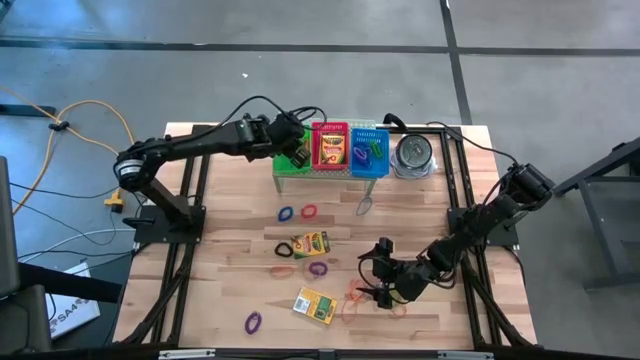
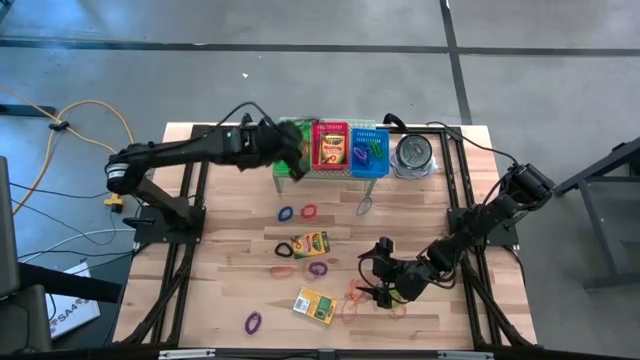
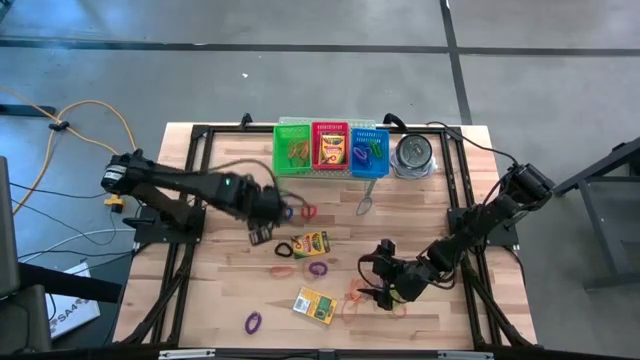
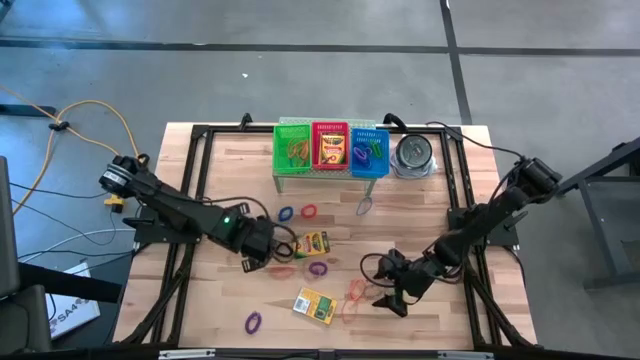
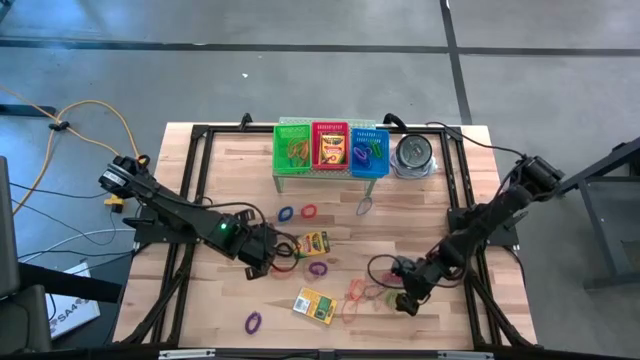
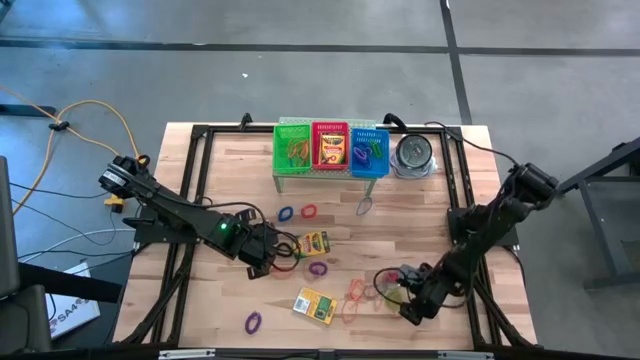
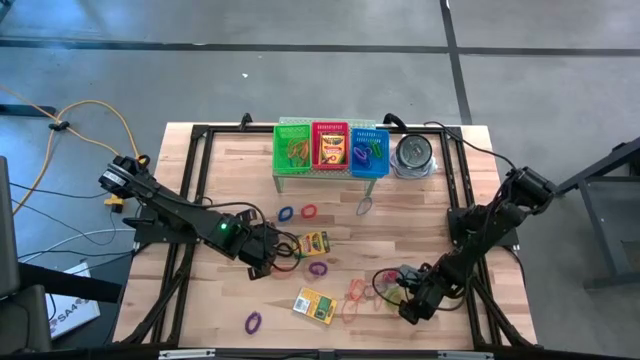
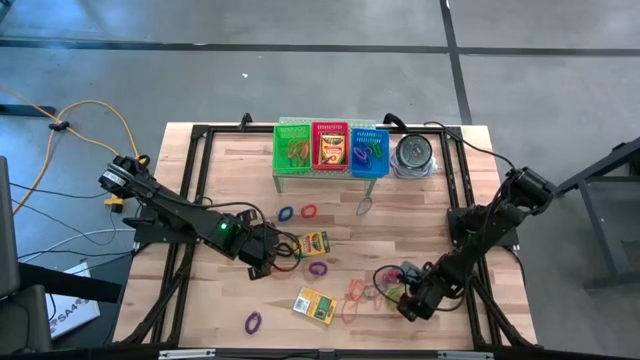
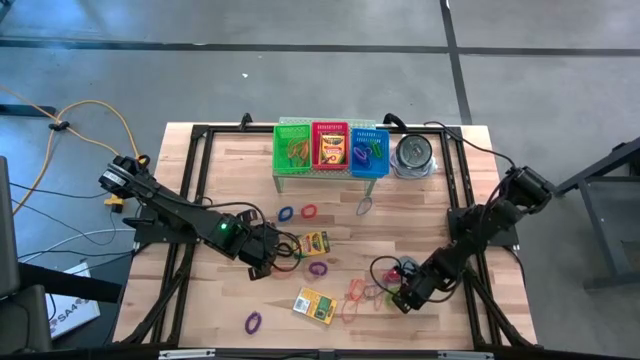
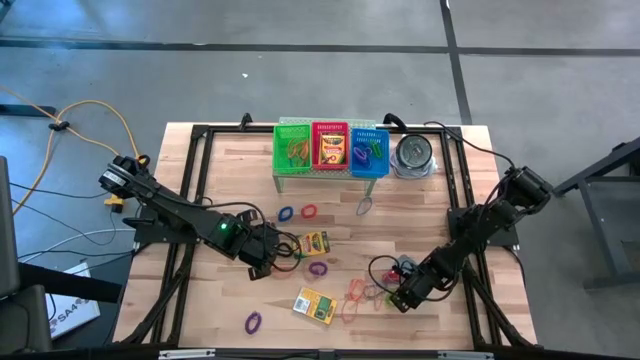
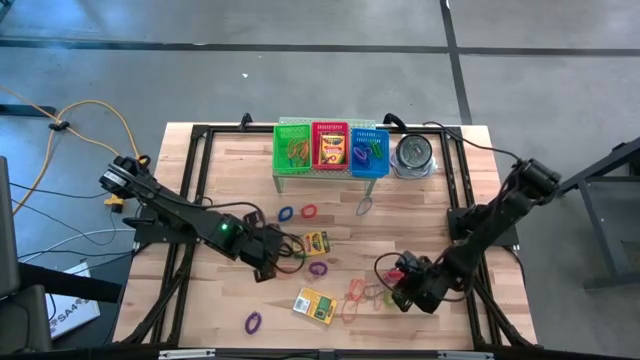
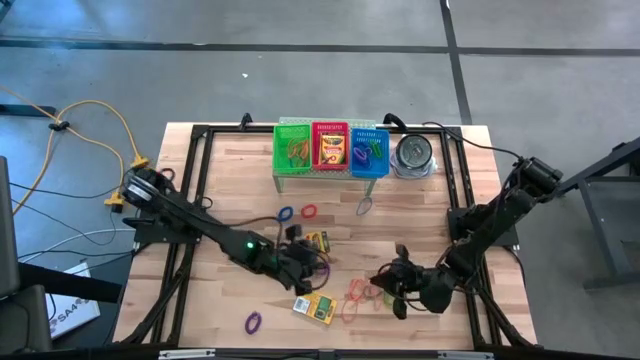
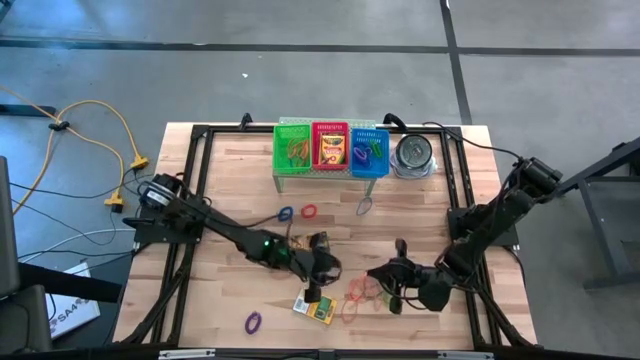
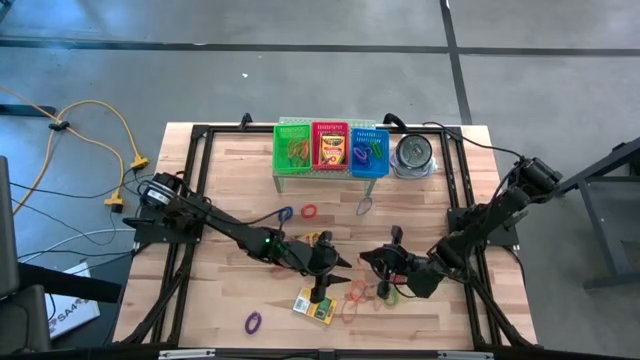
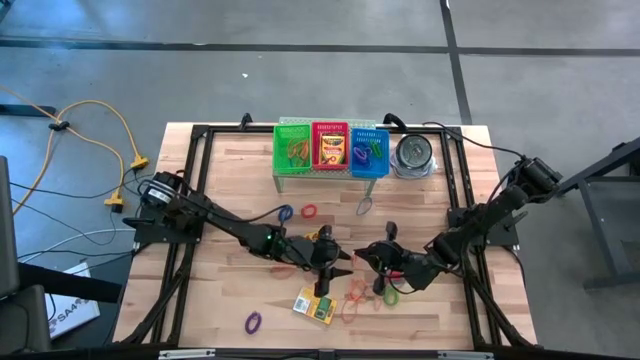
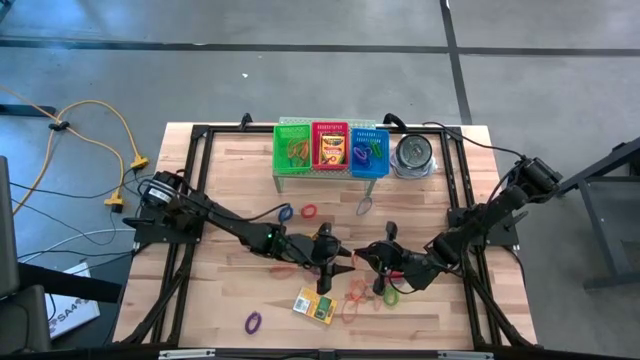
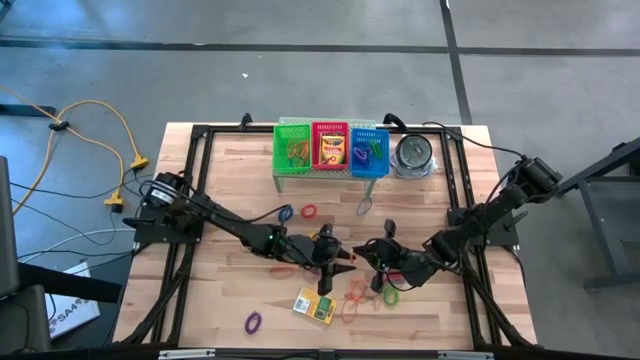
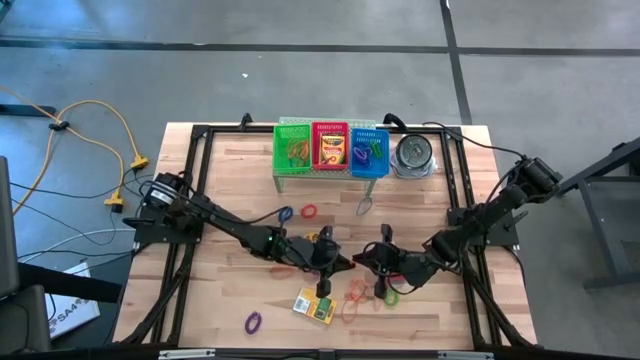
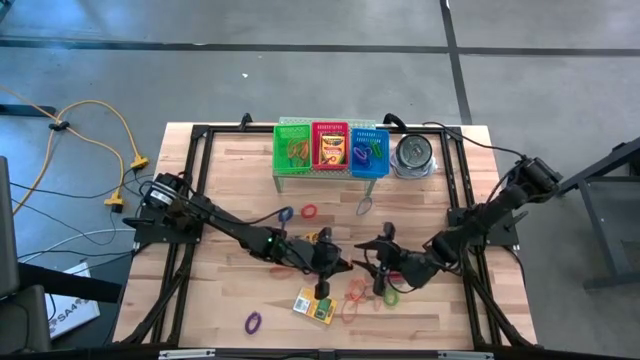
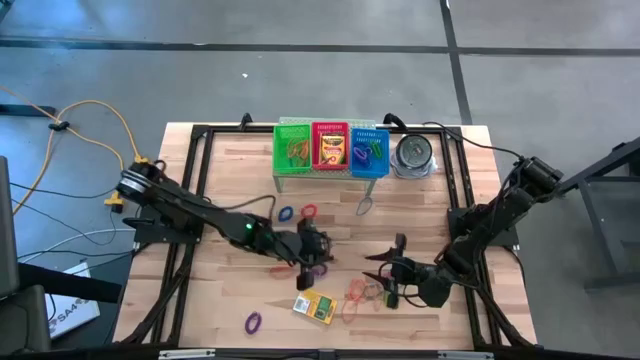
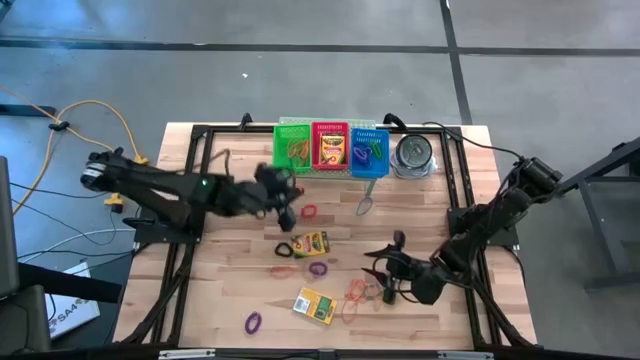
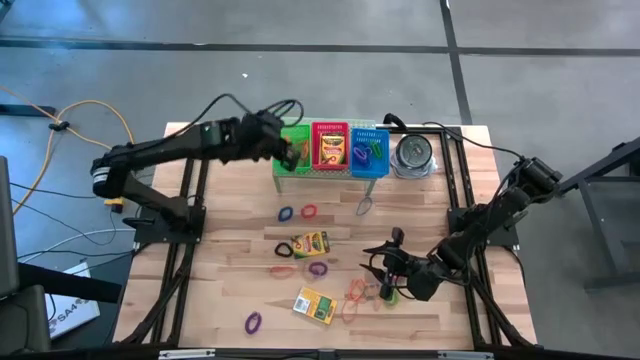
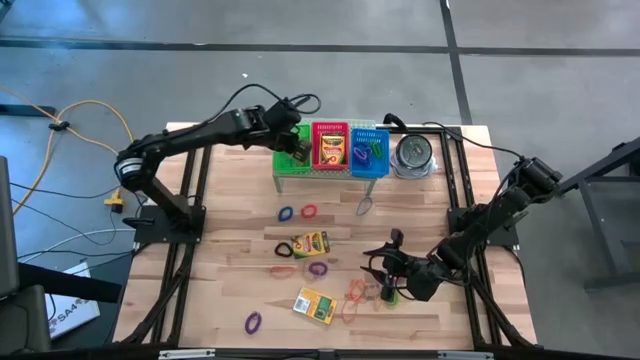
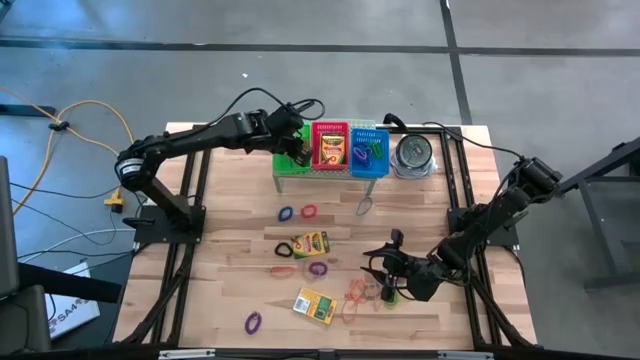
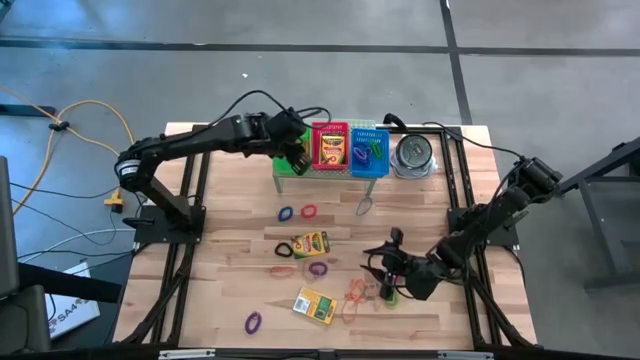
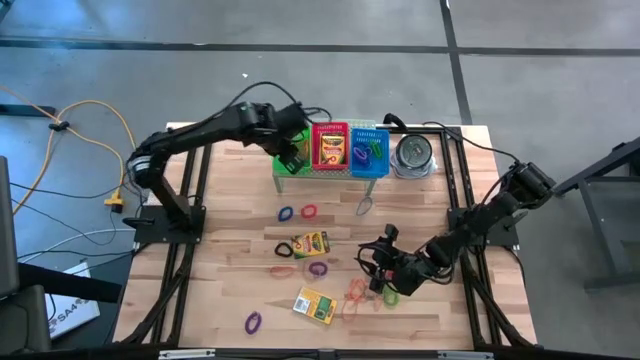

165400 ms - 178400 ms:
Task: Pick & Place Office Desk Supplies
Put the orange rubber band into the green bin on the shelf

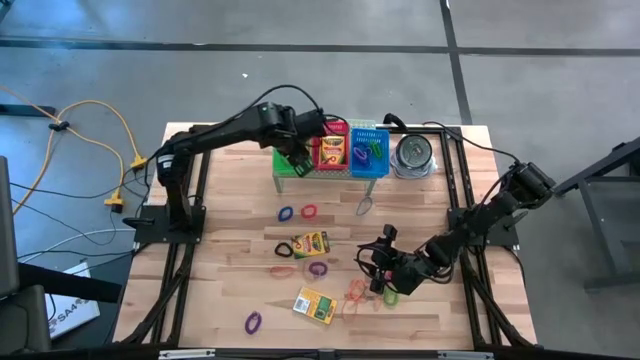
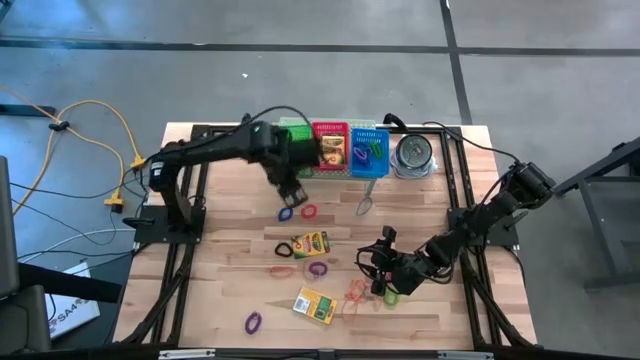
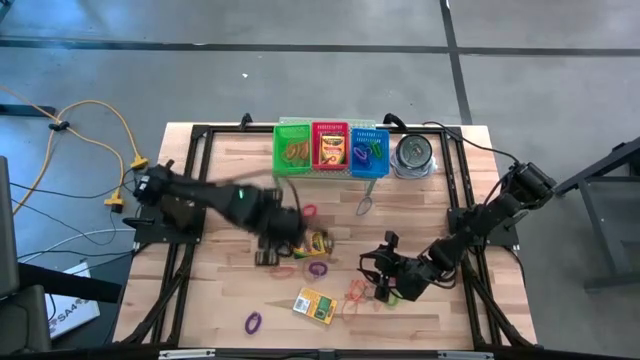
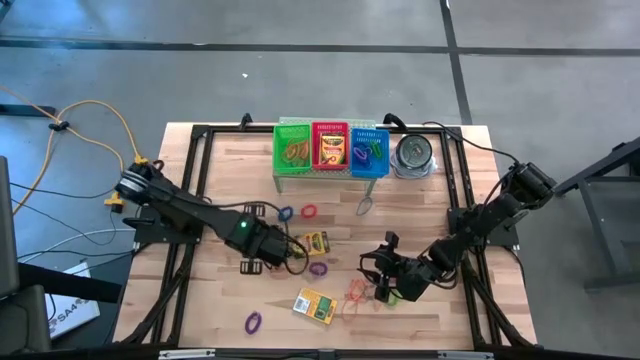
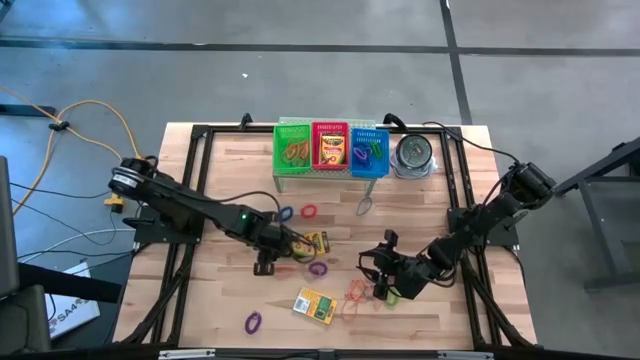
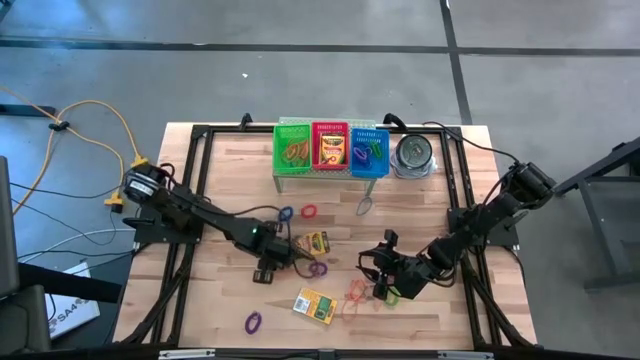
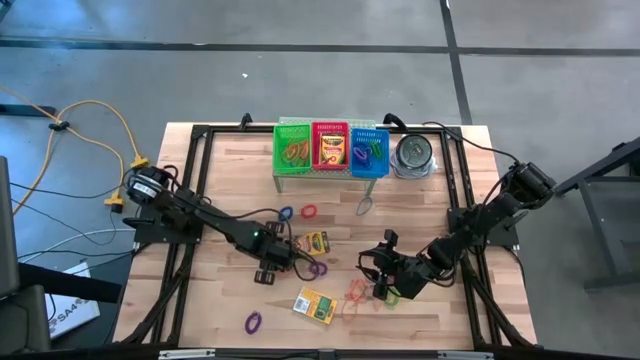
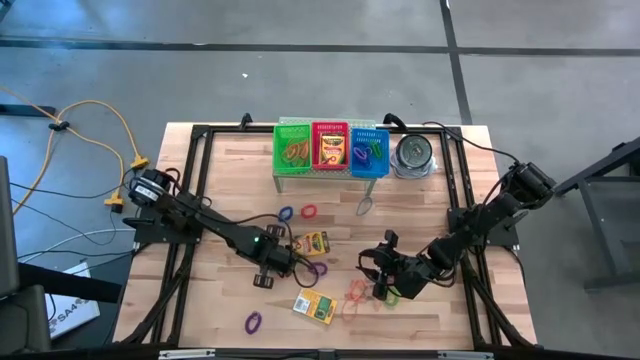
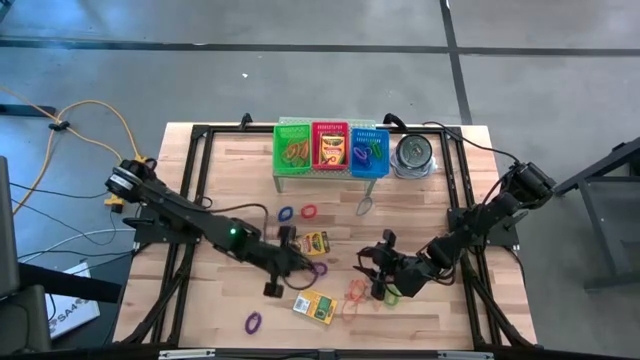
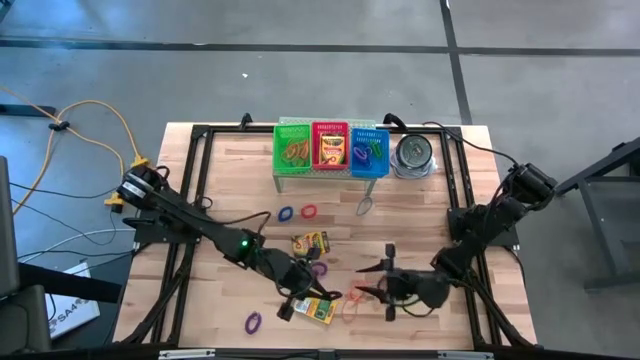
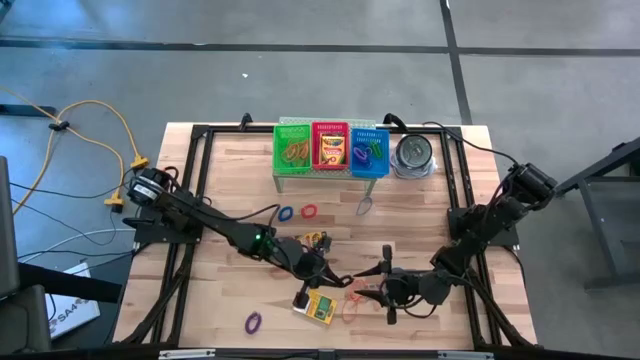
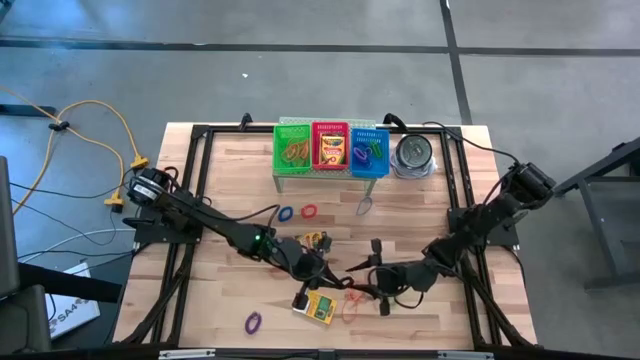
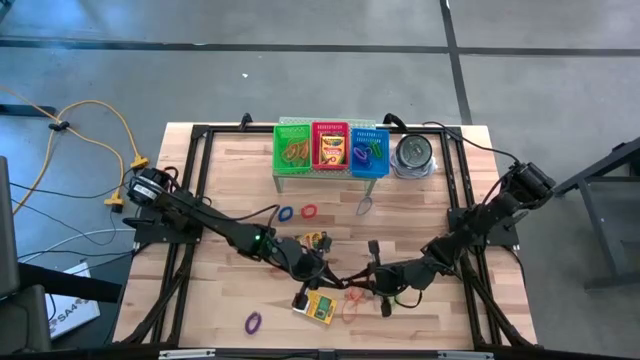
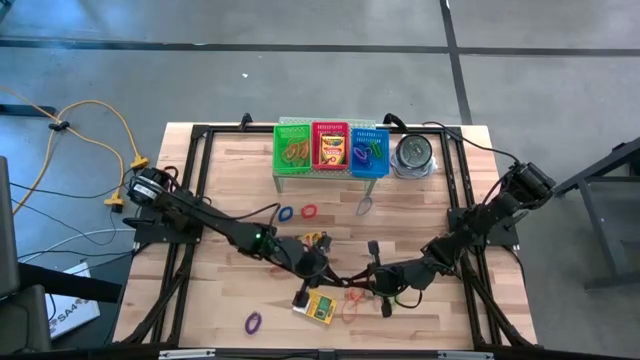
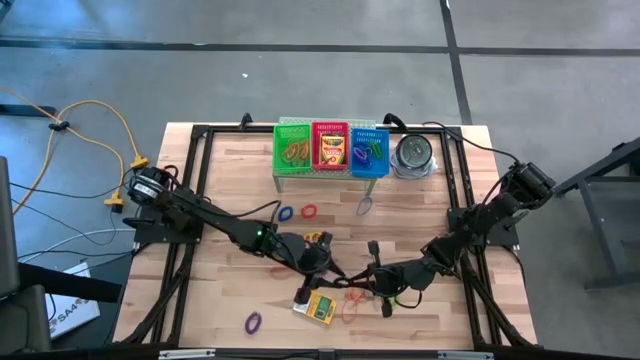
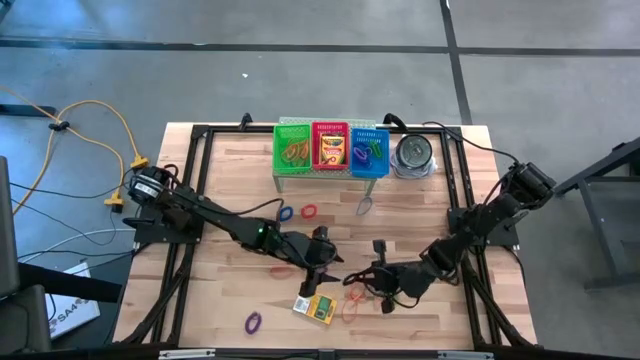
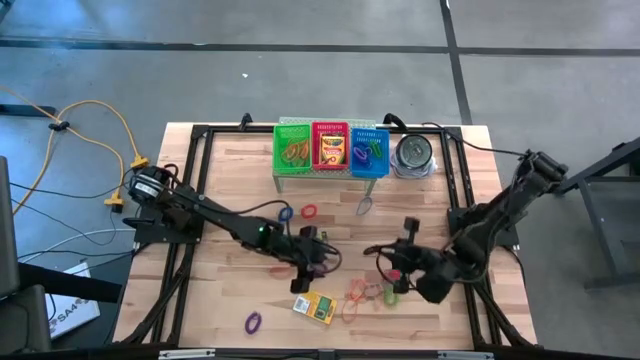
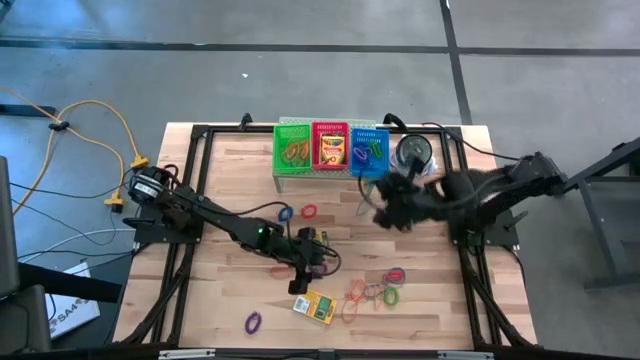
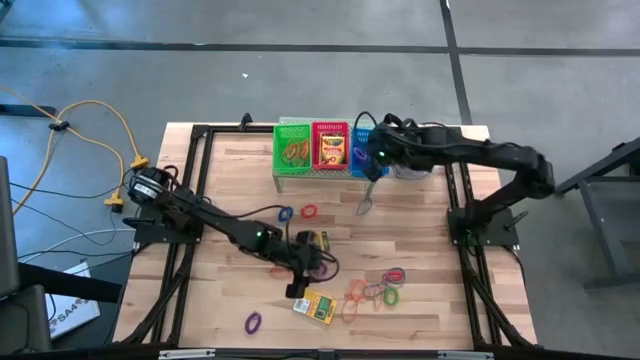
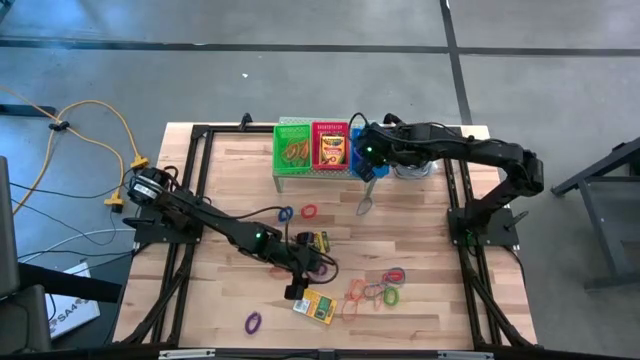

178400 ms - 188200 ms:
Put the black spring keychain into the blue bin on the shelf
